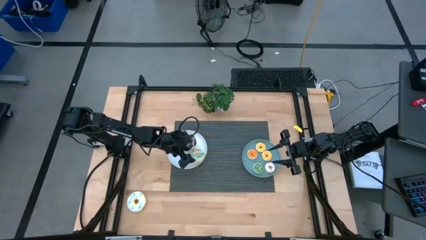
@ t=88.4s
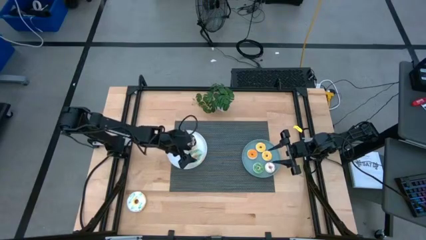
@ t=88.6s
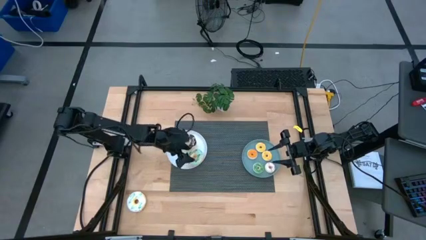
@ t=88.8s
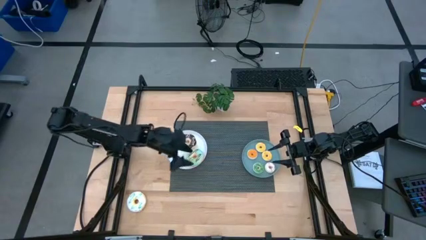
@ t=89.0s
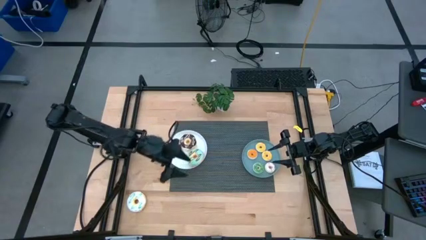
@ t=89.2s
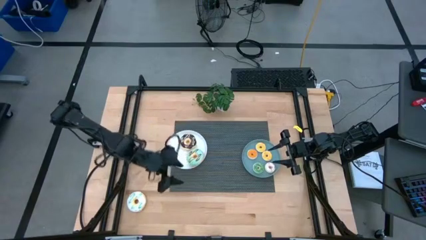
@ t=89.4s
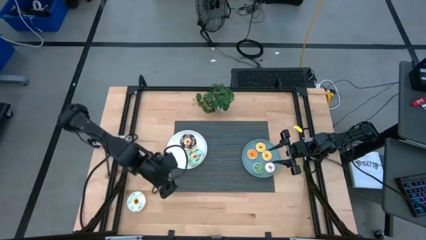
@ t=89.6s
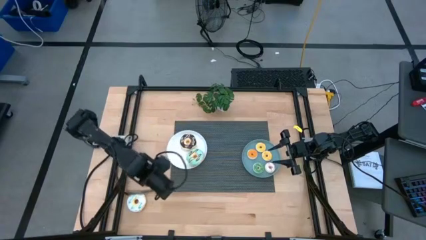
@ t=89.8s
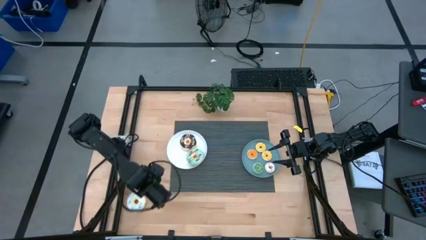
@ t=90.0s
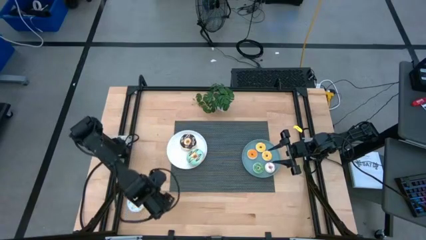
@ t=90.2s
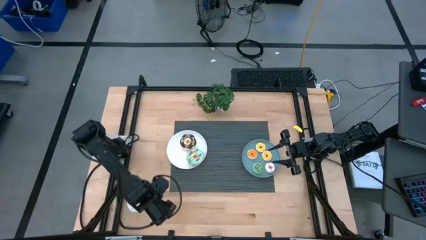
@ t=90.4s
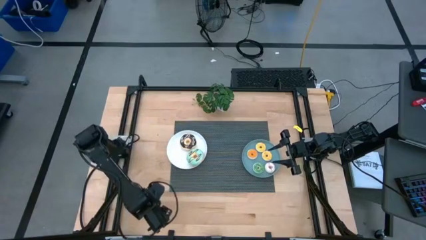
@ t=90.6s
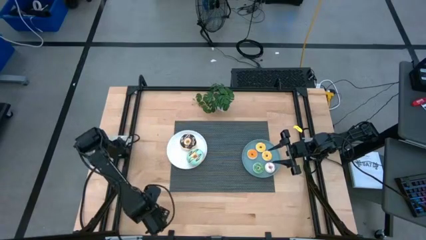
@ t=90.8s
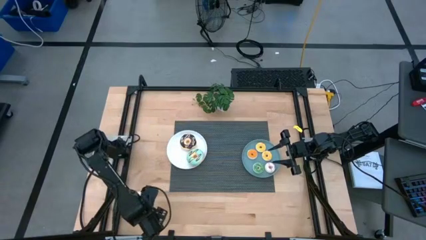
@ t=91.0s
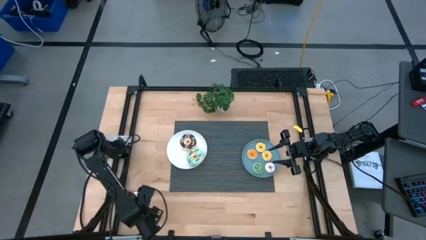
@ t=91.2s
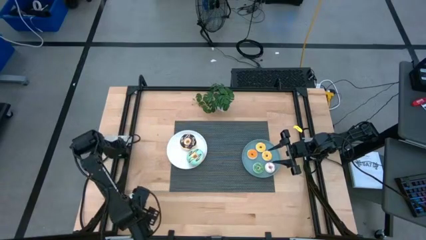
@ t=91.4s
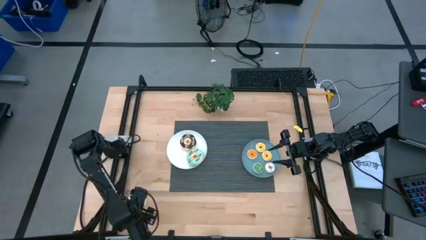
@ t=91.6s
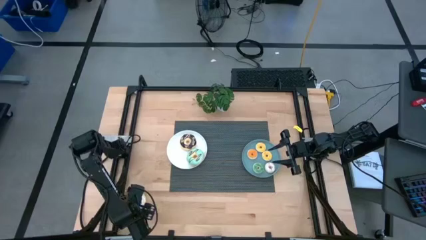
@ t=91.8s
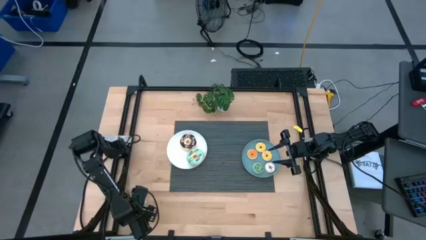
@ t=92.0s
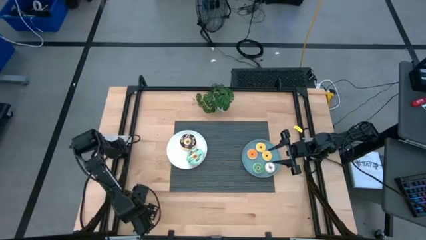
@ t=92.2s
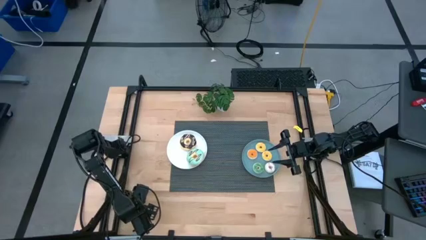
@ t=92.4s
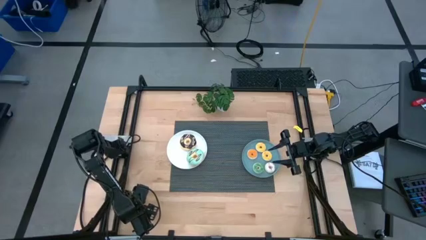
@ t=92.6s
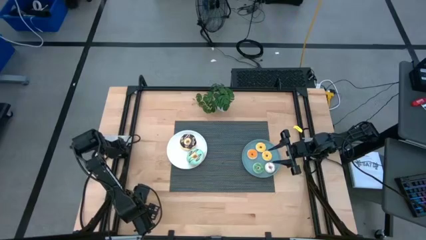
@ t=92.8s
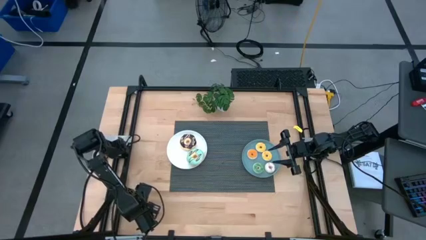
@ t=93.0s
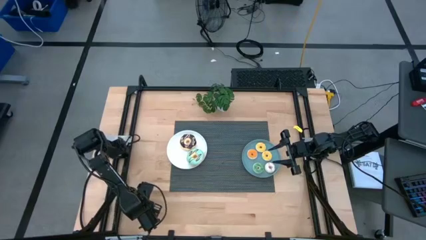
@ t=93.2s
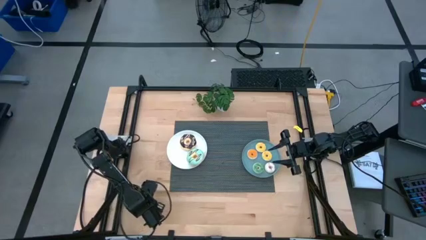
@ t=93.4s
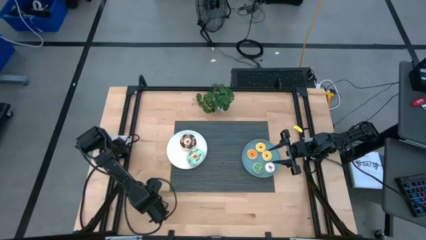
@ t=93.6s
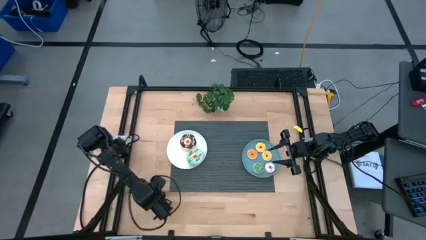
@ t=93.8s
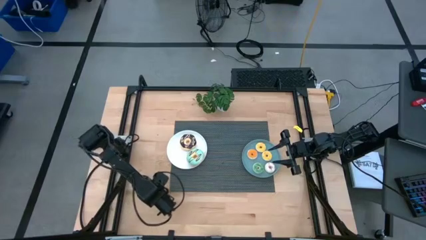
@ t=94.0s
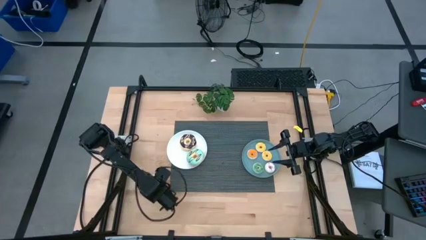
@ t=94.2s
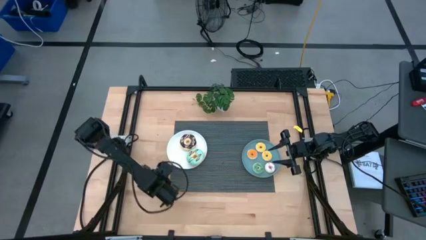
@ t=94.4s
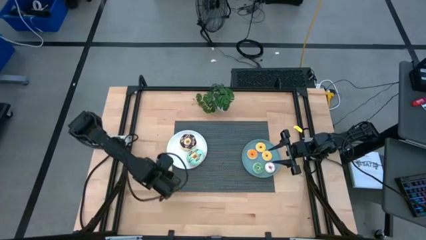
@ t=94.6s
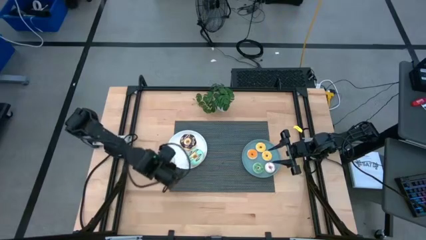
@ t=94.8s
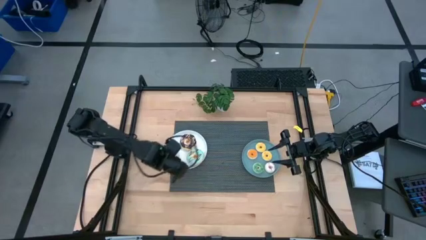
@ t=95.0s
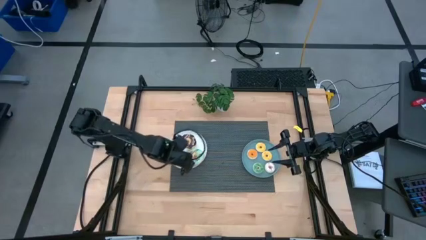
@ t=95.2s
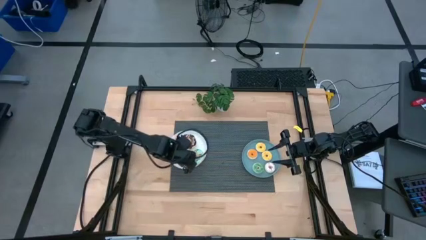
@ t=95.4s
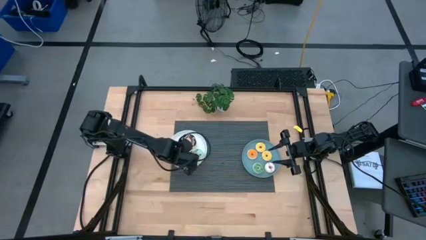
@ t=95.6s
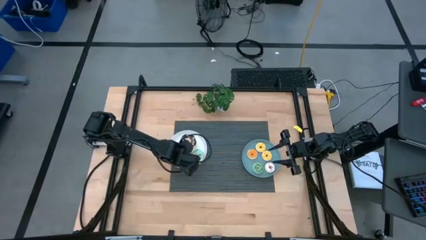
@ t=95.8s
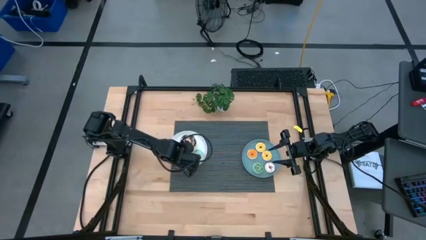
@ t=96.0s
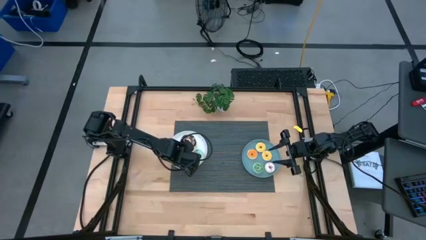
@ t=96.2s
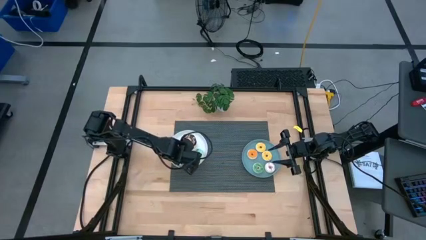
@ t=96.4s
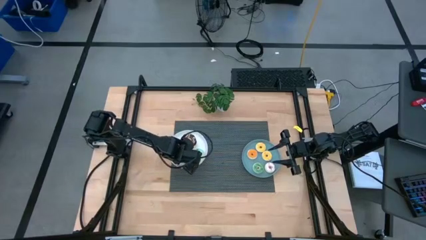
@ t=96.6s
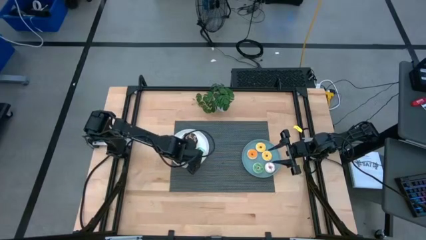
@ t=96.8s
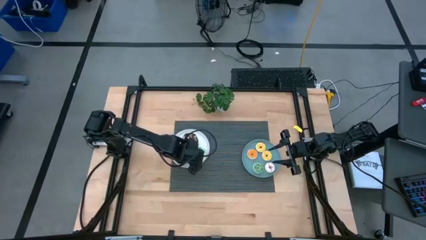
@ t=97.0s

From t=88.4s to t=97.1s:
Task: Pick & Place donuts
Put the large white doughnut on top of the white plate

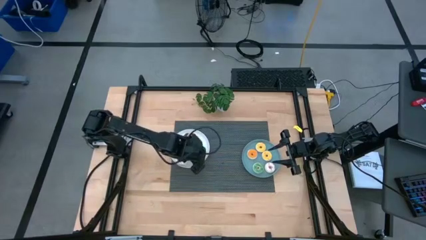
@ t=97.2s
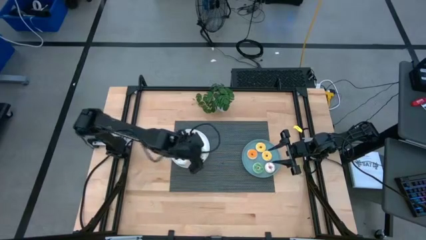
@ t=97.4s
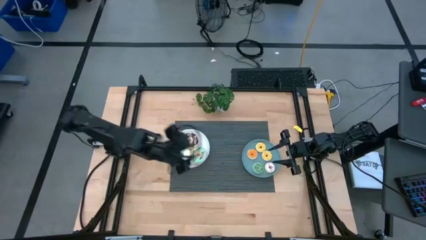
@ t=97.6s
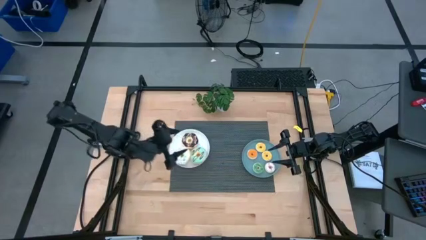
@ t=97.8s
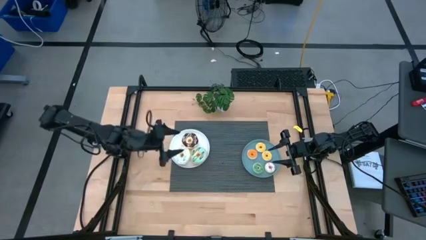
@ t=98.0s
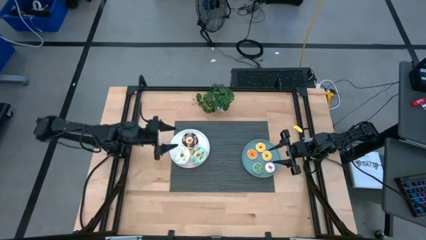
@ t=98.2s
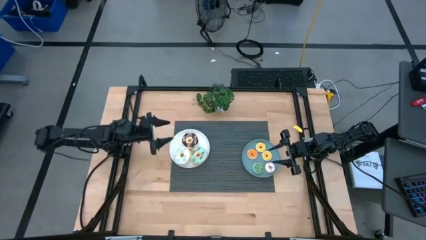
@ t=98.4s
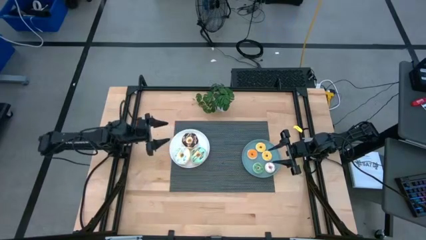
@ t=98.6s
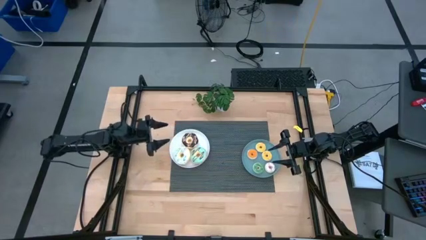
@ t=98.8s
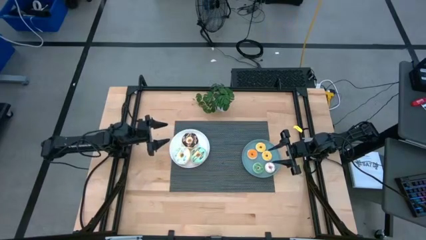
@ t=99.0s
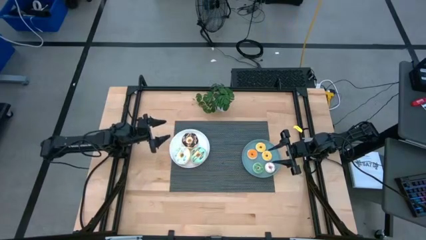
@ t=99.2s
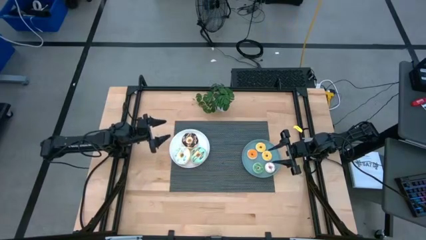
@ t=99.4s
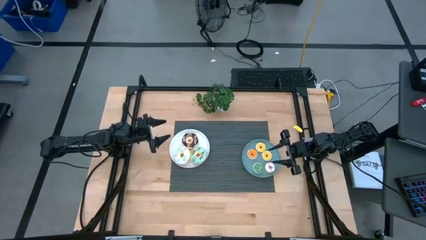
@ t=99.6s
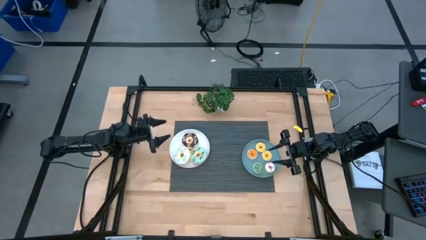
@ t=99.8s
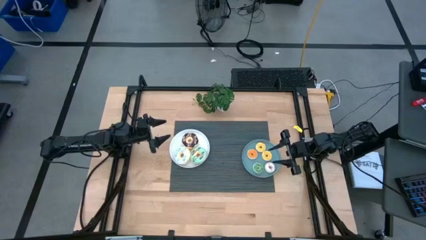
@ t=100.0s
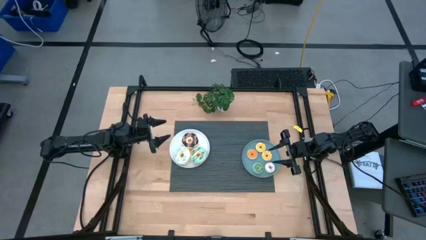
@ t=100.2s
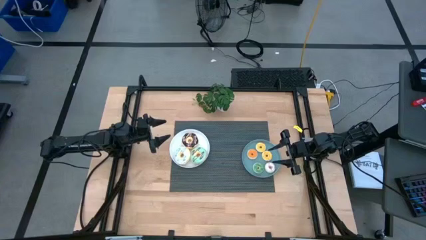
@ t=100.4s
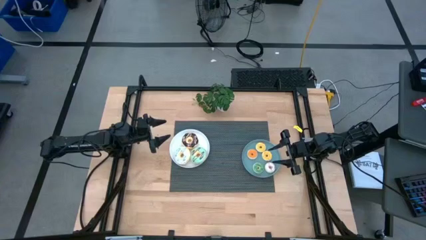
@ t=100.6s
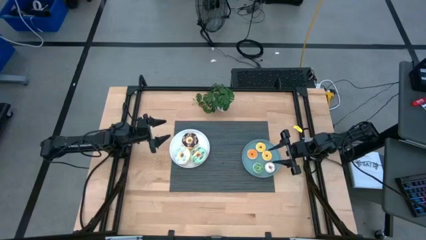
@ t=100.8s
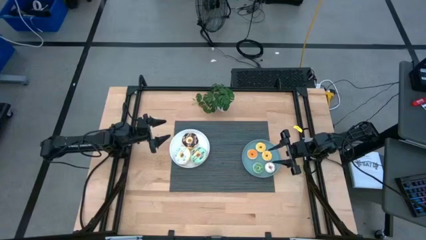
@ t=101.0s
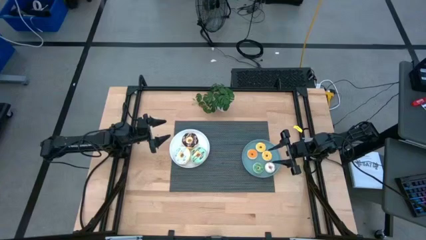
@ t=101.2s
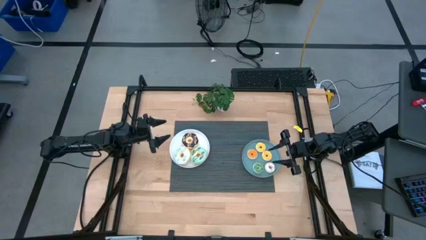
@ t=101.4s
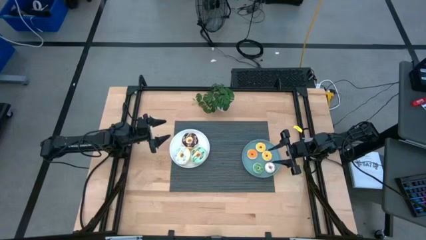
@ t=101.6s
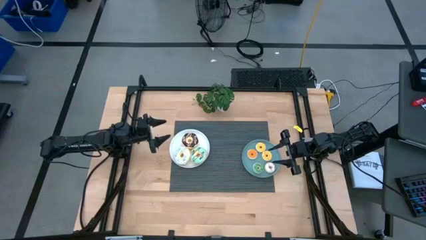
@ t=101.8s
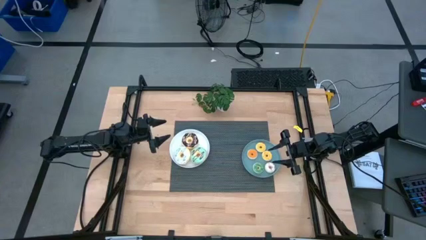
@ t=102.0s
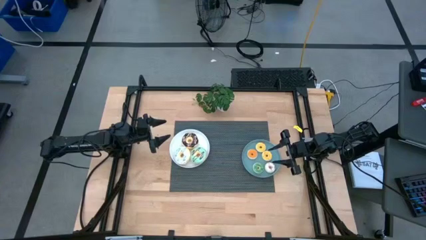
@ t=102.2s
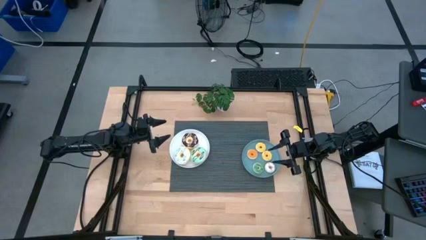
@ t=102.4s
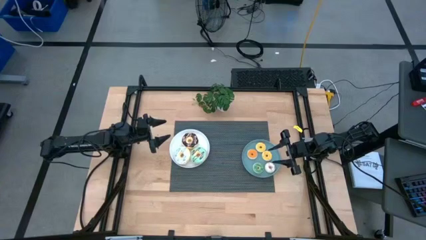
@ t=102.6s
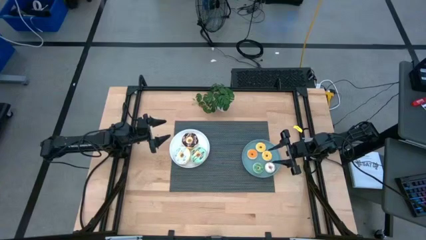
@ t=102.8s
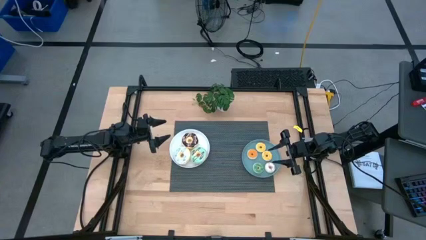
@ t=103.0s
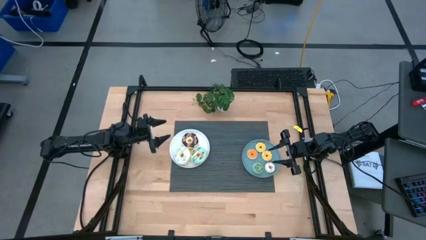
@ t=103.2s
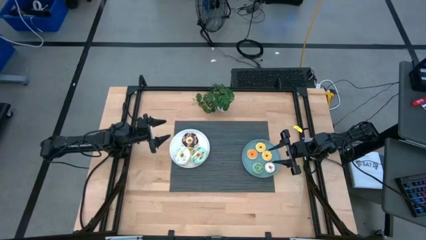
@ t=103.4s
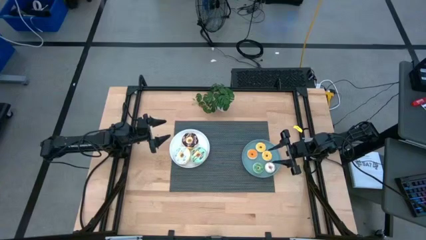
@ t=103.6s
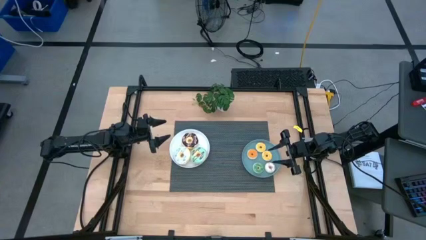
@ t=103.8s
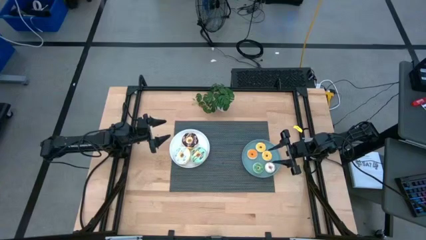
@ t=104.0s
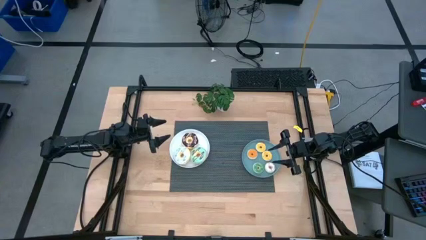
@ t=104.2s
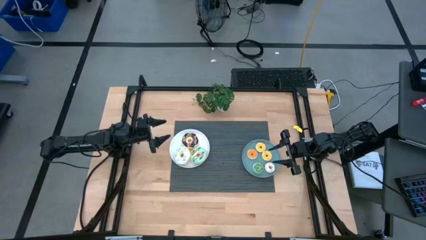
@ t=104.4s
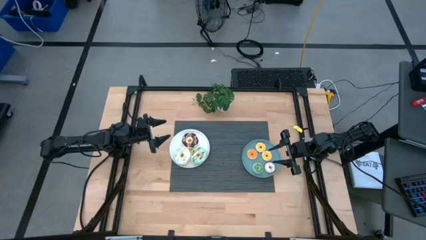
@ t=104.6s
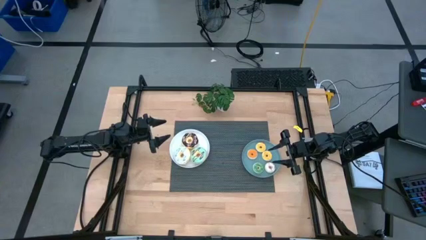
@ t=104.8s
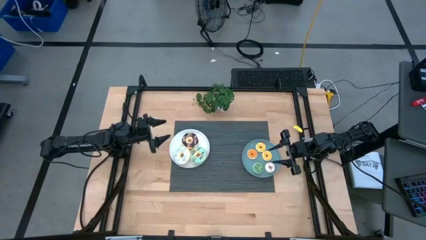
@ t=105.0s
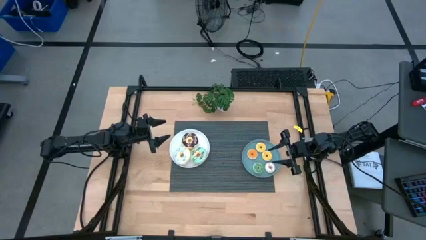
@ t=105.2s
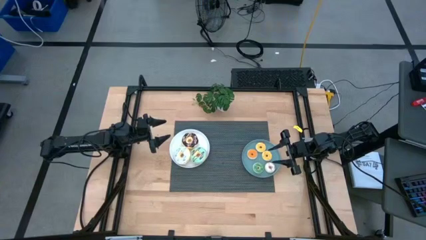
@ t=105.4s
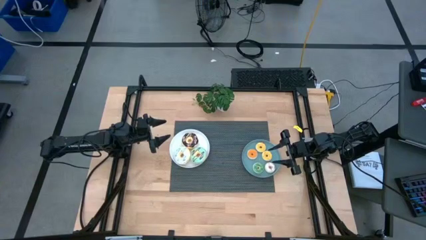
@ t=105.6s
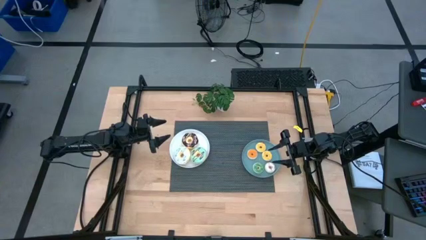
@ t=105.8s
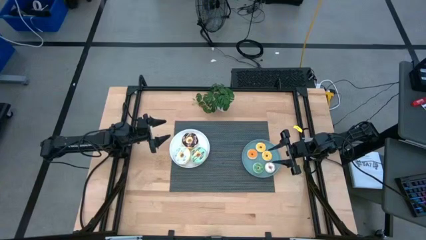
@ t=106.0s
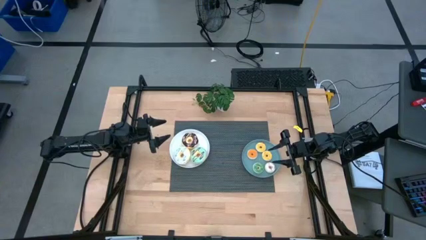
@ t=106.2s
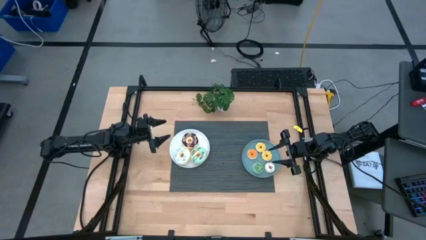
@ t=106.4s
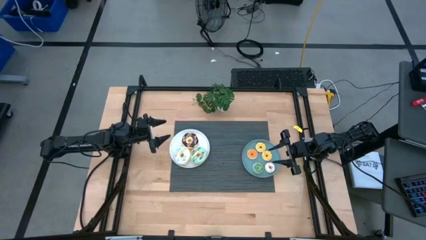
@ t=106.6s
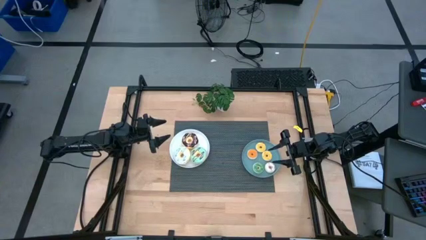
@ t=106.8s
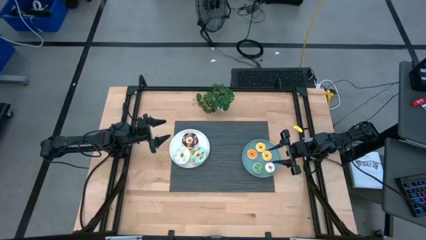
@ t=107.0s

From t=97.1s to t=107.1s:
Return to Home Position
